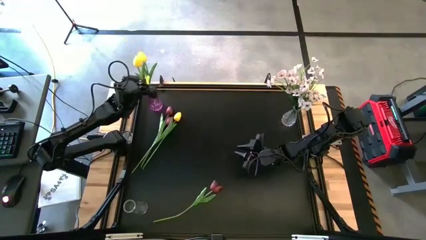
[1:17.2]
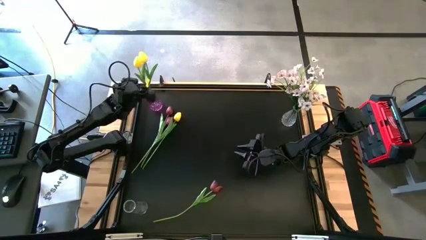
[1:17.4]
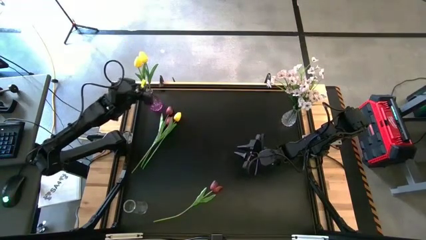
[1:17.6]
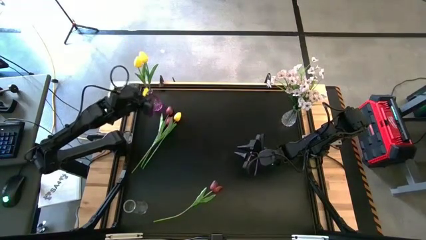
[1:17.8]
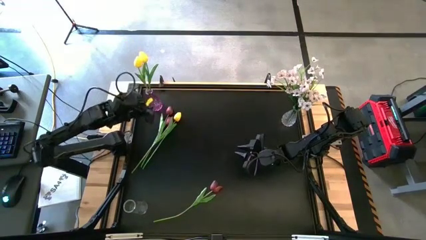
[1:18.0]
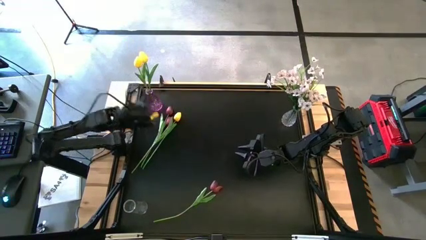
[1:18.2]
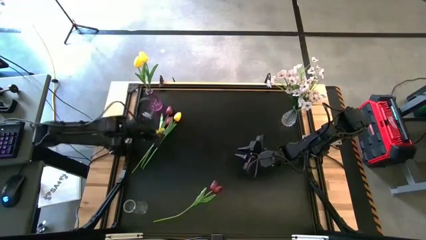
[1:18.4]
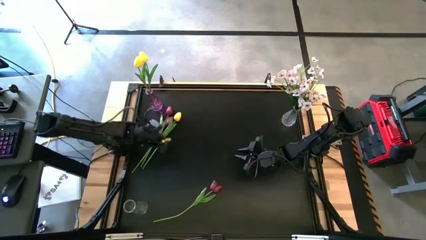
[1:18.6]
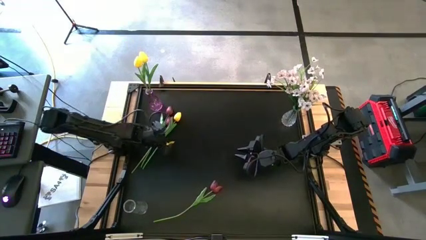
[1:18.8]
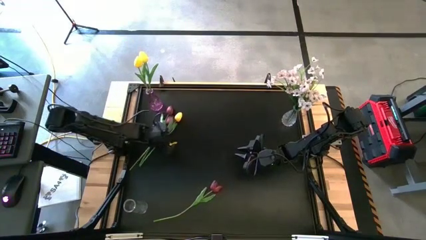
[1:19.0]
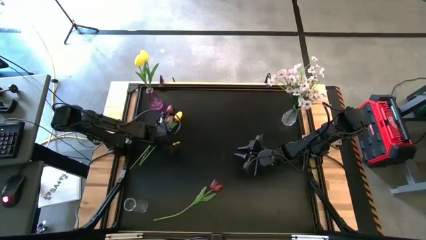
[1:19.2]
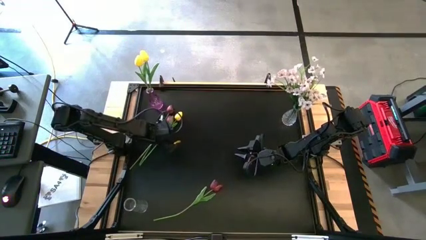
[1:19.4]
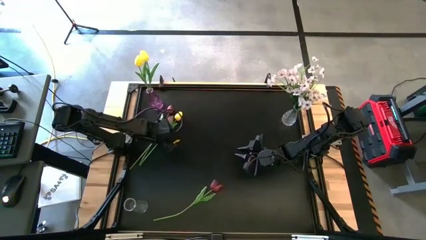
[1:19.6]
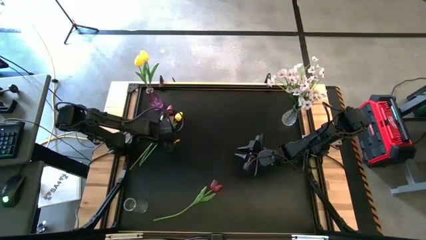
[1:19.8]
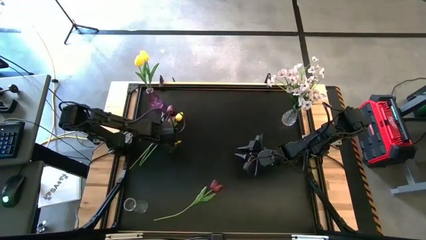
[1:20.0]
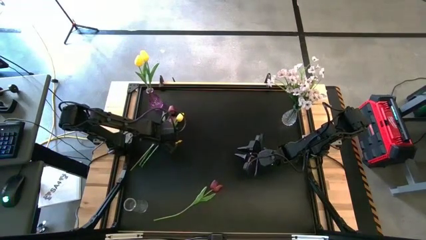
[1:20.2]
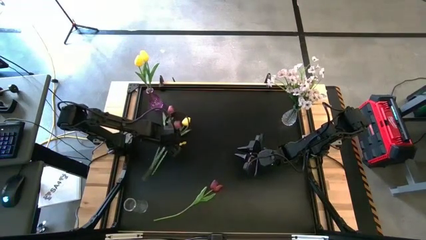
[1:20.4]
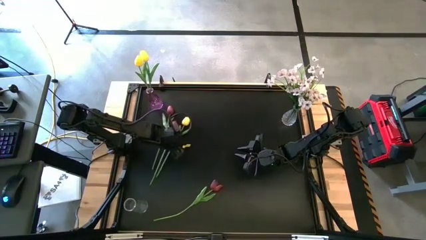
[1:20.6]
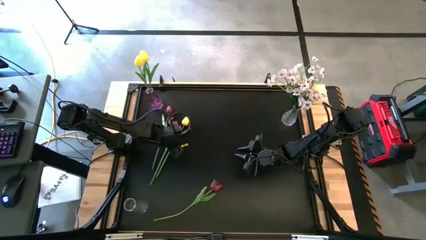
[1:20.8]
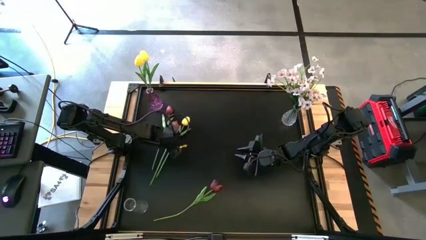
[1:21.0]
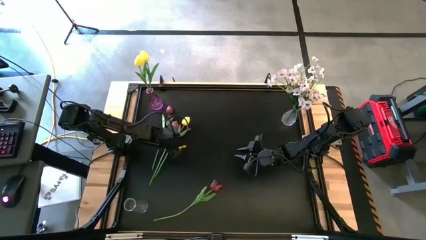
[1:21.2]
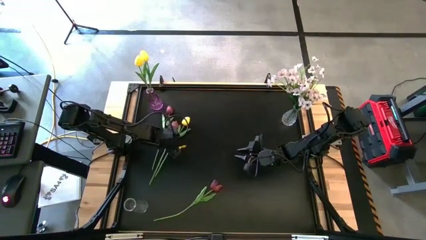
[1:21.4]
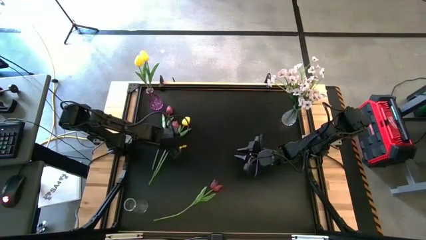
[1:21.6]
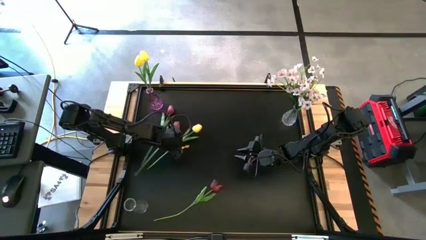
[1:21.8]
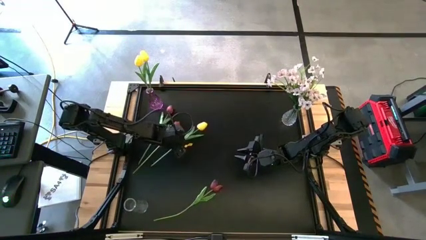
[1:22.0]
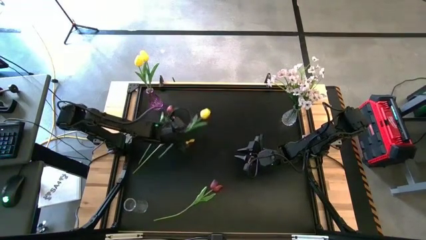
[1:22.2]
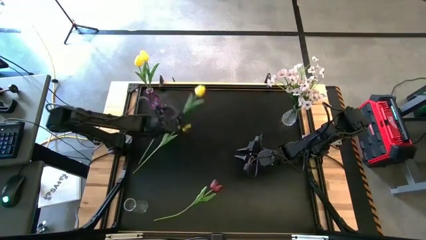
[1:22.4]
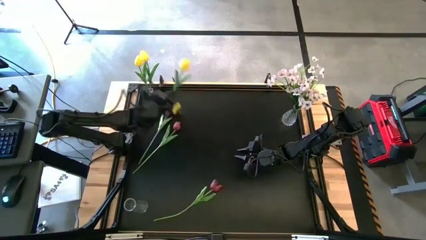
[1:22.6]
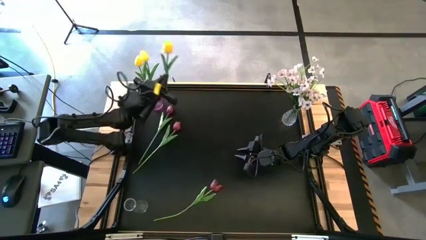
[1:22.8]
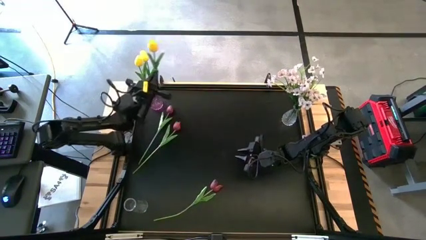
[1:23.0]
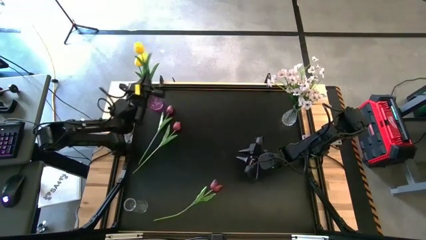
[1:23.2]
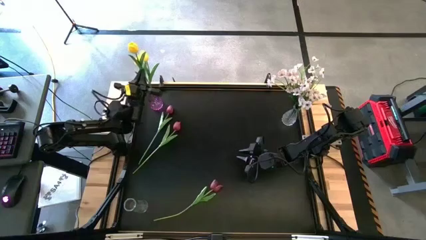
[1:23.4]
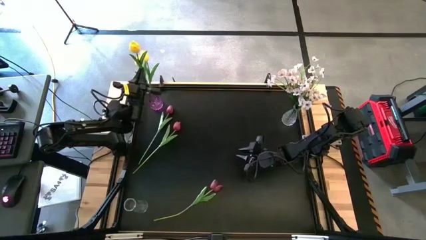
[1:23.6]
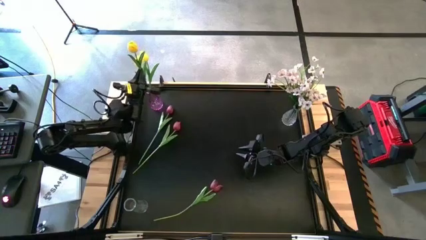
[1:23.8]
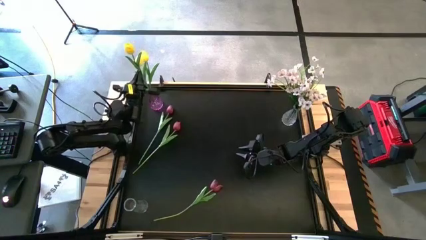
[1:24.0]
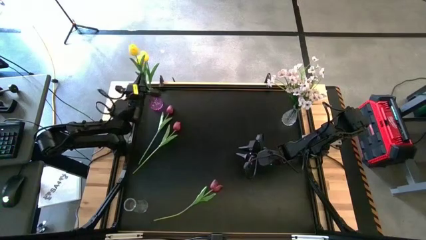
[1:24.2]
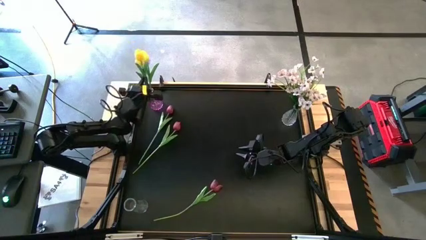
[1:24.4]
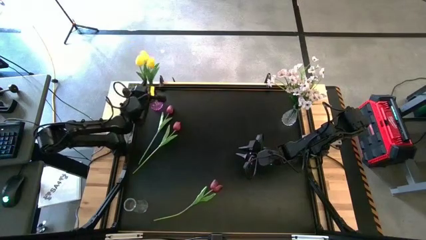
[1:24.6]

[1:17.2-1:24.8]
Task: Sort flowers into vase by color
Put the yellow flower into the purple vase

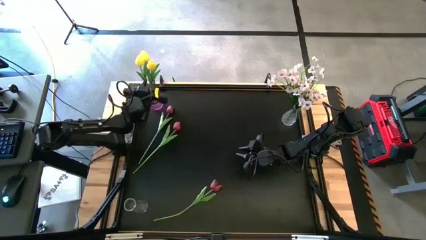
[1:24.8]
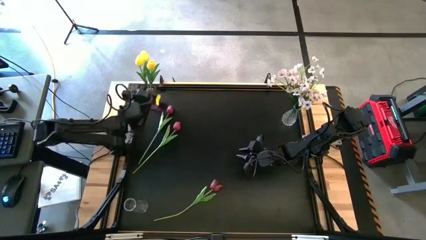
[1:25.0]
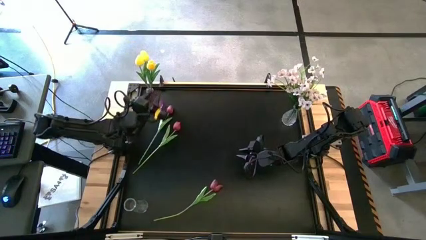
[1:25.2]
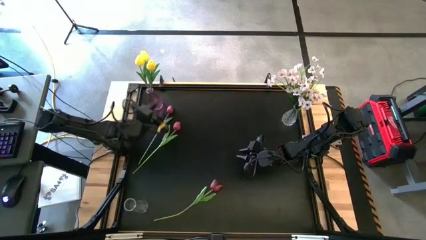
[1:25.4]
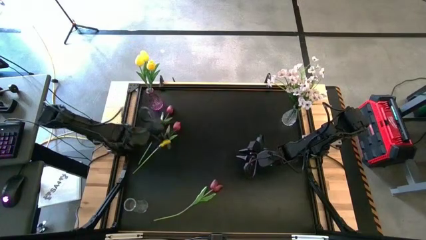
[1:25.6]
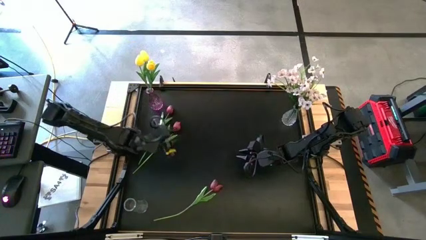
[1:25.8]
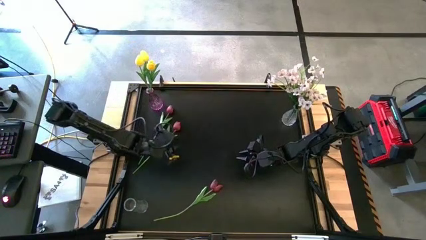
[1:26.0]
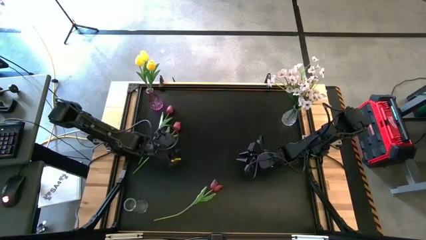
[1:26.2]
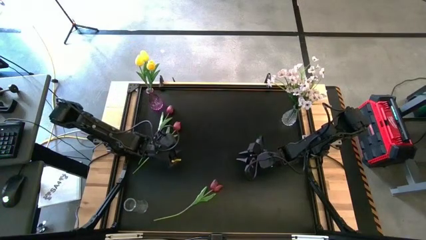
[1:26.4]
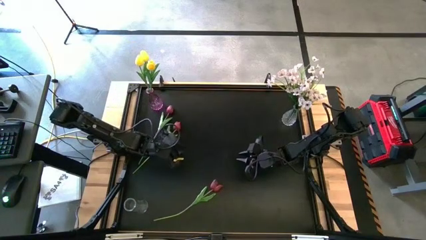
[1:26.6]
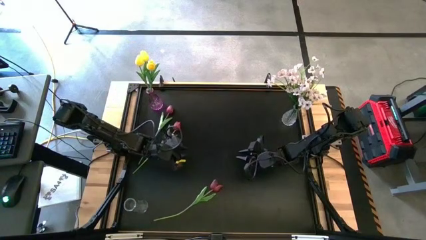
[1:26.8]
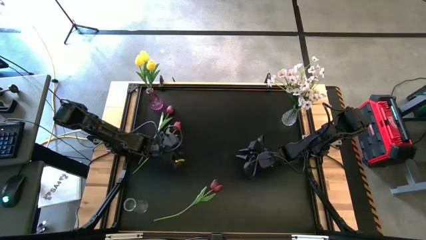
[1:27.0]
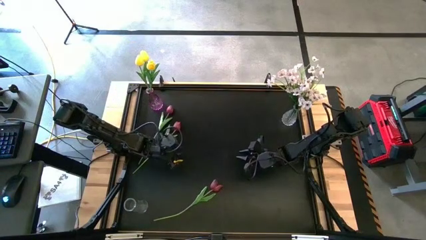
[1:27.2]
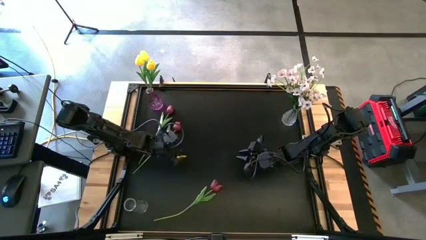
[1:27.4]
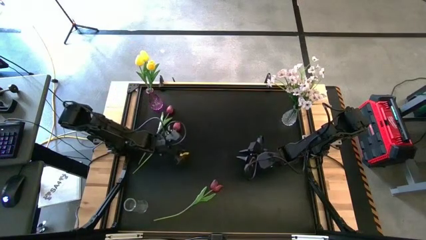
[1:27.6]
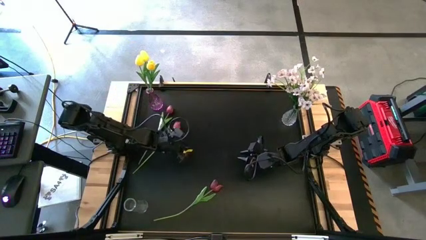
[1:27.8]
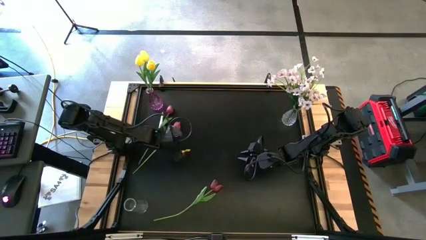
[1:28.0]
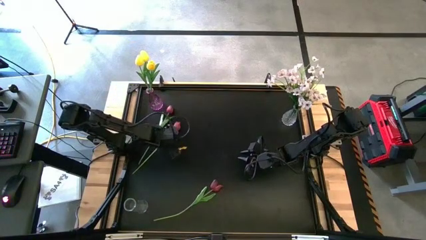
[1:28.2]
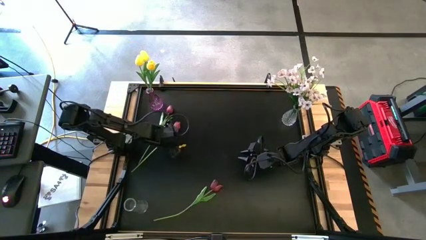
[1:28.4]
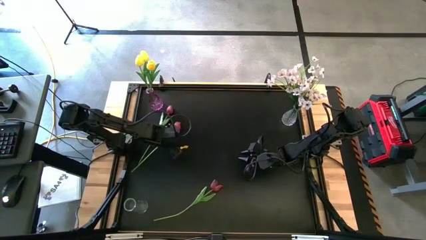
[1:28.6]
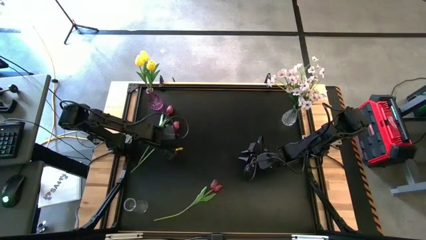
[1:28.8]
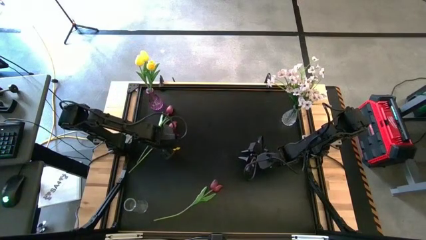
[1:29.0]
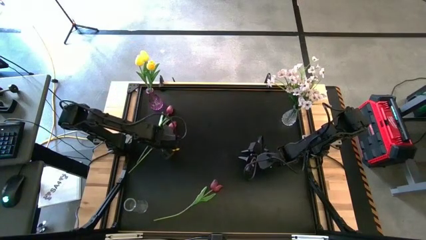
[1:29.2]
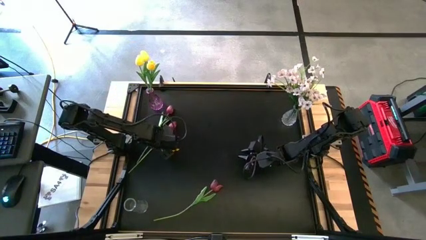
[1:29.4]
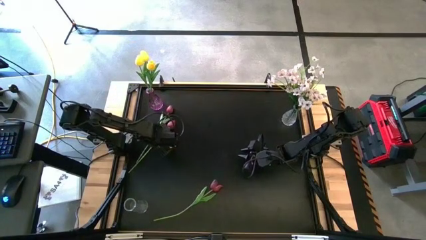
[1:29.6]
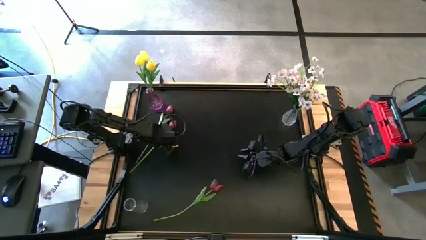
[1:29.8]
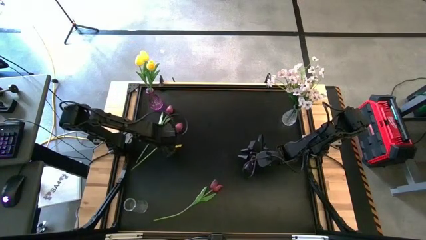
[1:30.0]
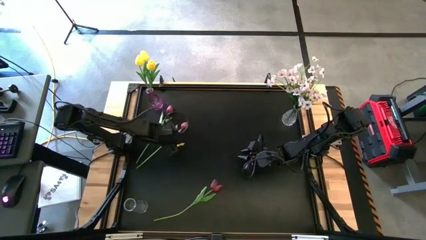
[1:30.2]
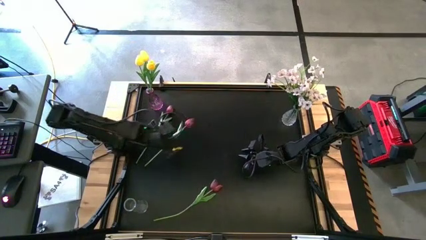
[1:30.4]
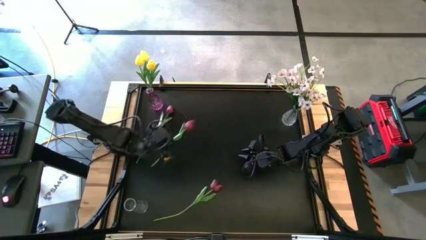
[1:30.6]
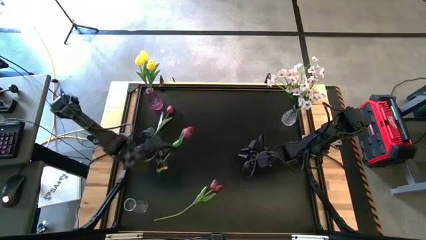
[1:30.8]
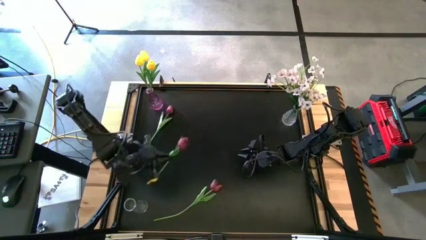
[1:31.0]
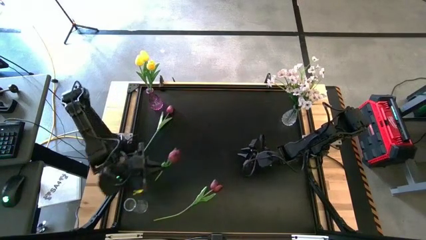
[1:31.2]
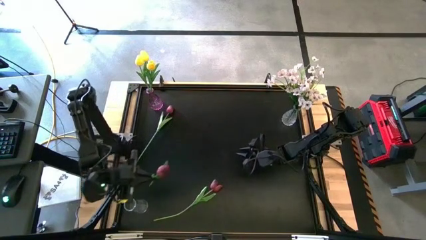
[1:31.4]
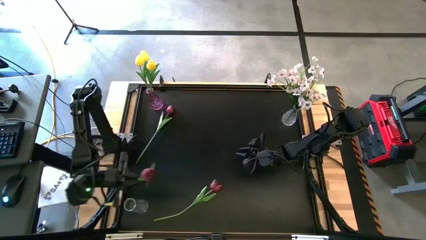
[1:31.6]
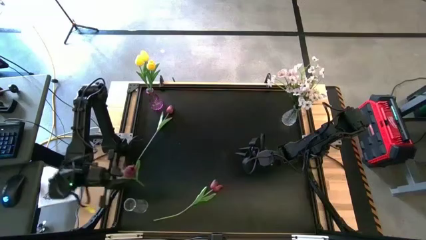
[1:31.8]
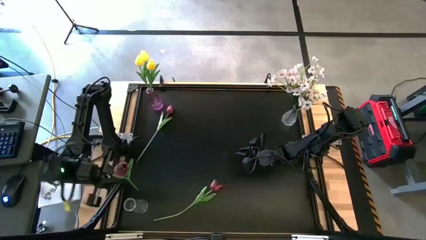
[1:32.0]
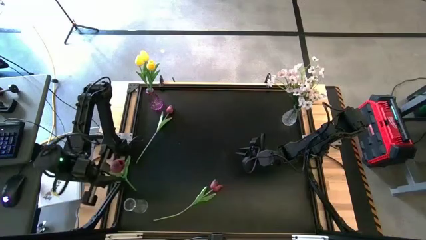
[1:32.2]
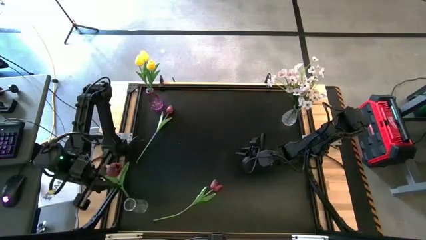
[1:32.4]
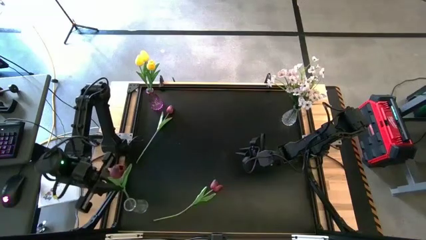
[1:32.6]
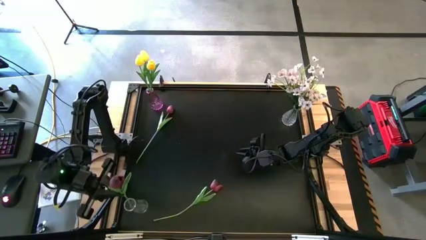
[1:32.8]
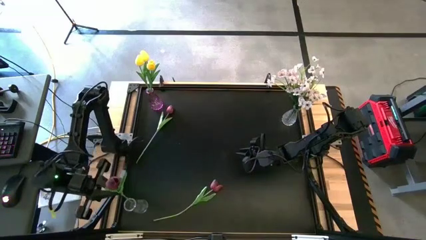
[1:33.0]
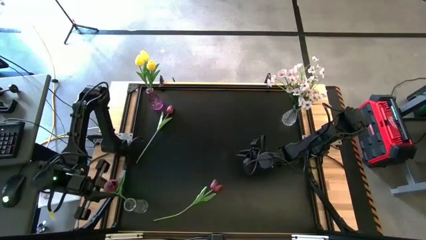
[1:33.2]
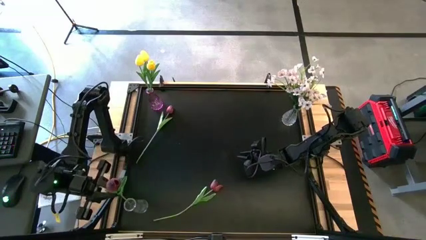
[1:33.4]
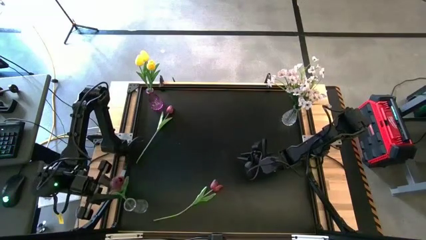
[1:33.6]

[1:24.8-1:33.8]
Put the middle red flower into the bottom transparent vase
